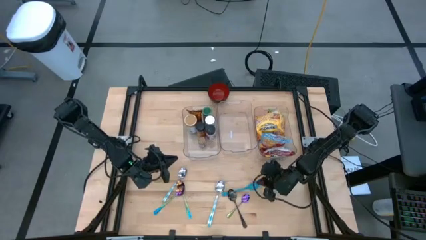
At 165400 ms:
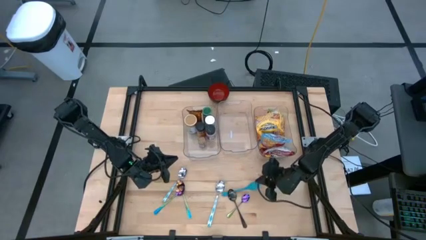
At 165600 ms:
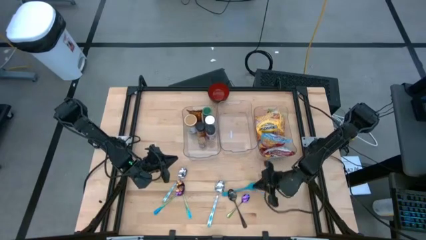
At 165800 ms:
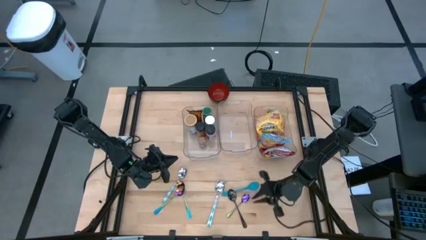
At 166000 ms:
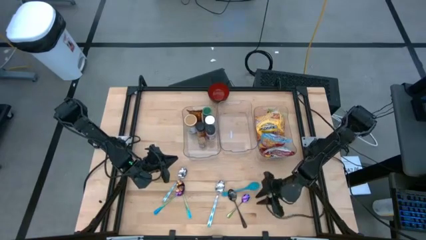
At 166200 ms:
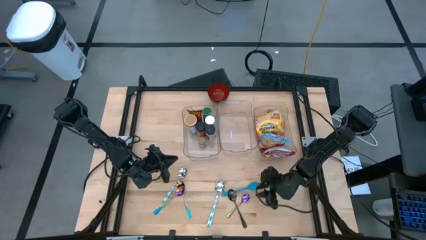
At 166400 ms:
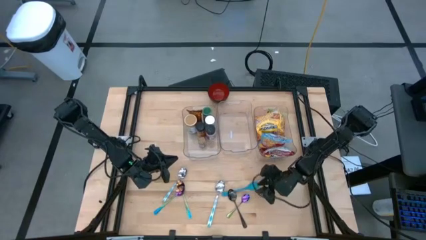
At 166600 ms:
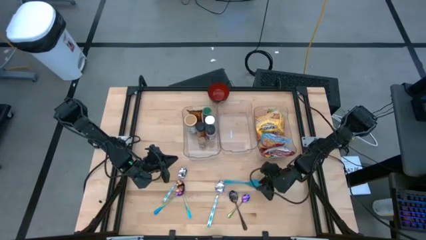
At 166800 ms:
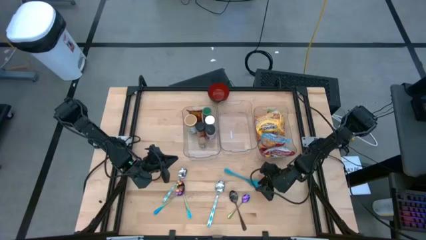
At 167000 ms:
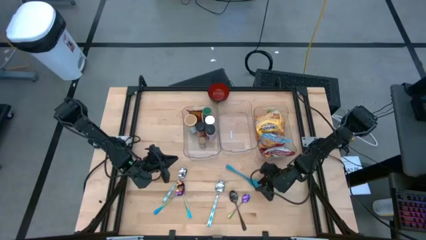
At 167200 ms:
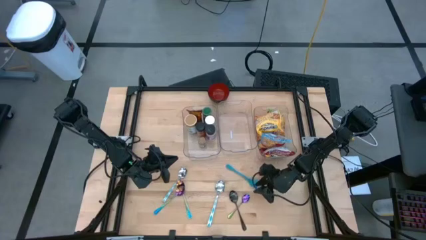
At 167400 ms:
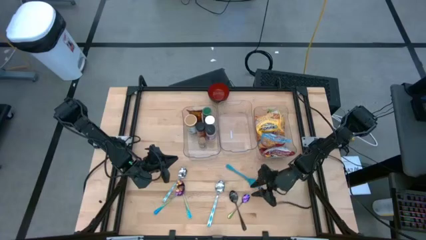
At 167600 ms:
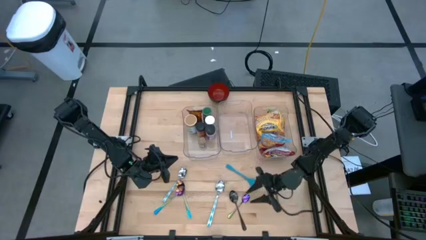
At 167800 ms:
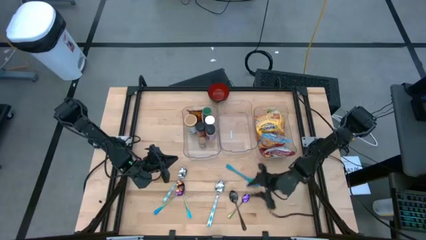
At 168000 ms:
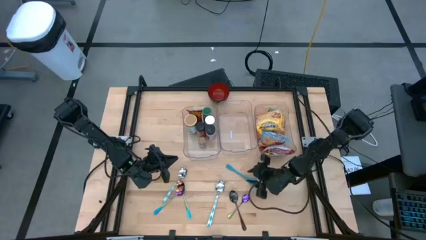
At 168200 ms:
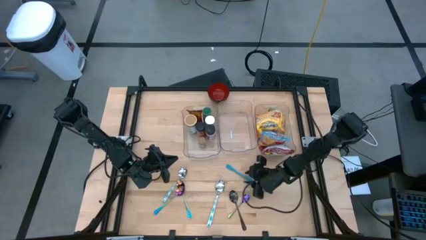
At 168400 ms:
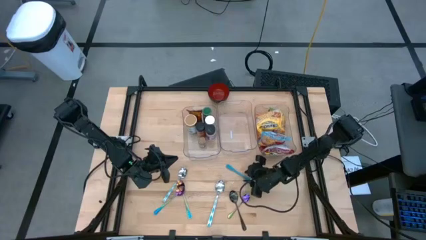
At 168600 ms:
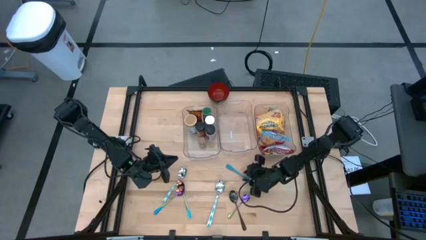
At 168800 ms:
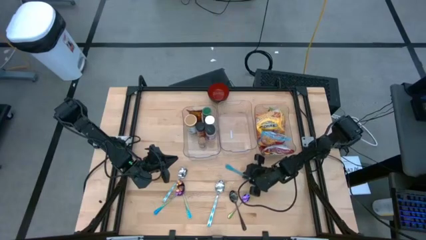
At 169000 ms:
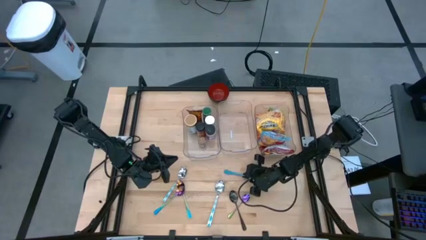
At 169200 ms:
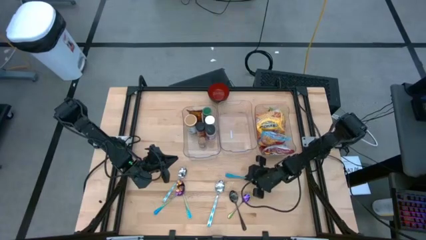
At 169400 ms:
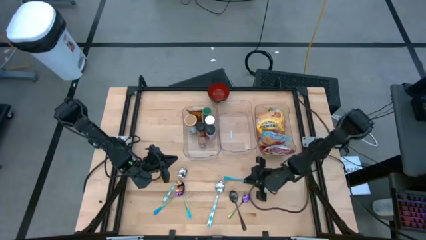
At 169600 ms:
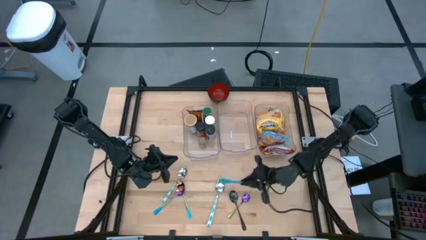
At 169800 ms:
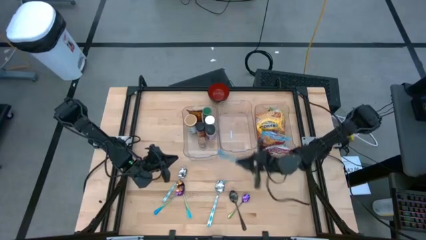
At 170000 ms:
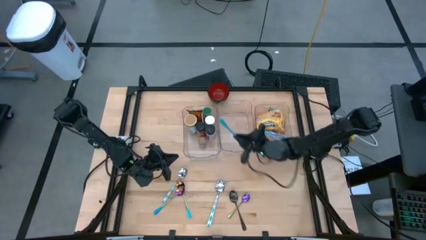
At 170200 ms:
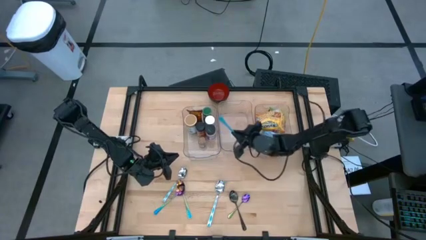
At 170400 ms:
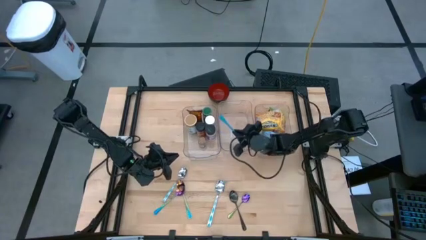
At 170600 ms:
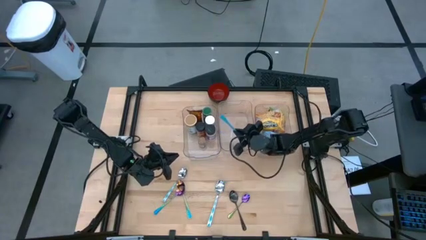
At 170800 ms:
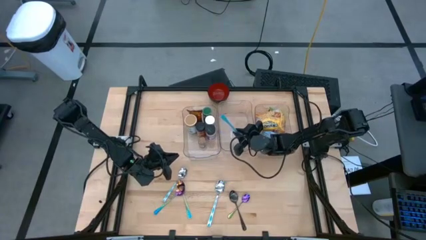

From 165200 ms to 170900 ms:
Task: Pick & Place Food Item
Put the blue spoon into the middle transparent bin

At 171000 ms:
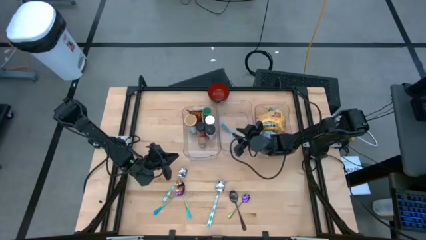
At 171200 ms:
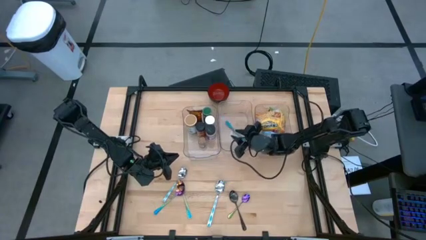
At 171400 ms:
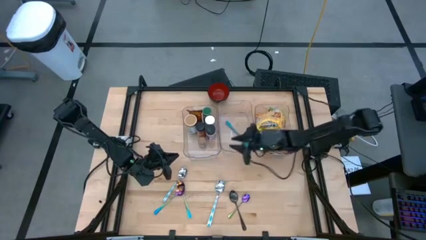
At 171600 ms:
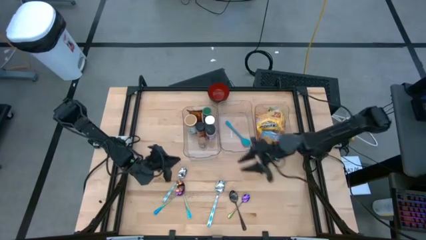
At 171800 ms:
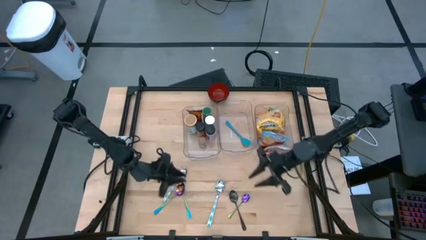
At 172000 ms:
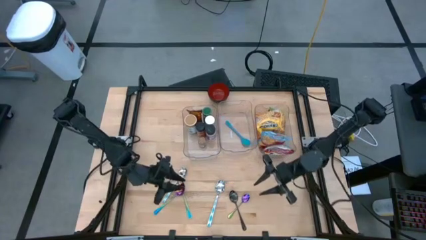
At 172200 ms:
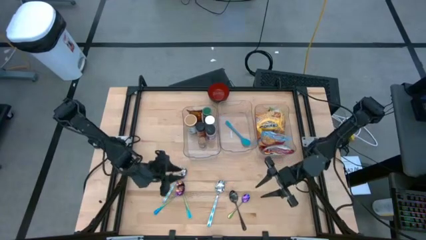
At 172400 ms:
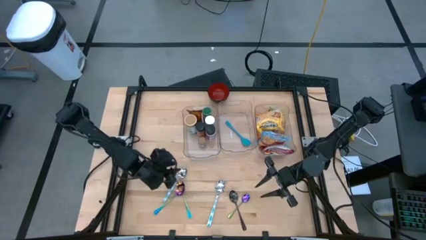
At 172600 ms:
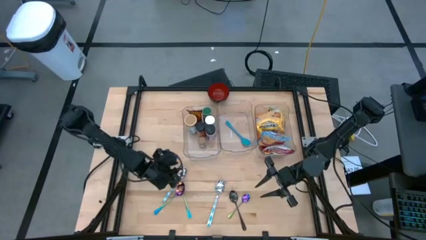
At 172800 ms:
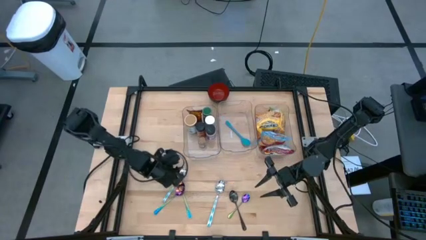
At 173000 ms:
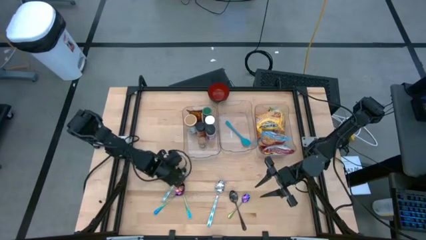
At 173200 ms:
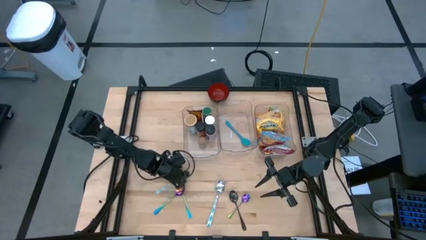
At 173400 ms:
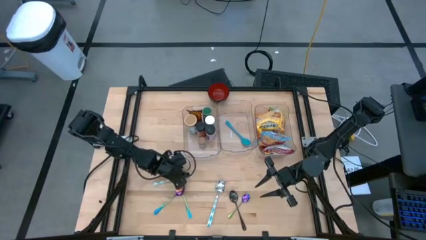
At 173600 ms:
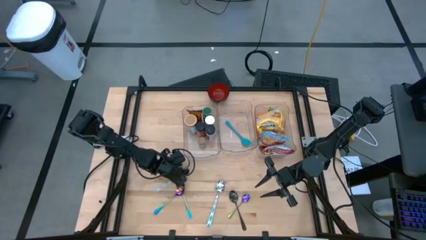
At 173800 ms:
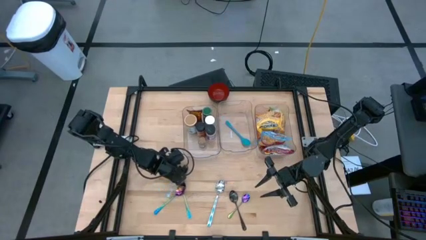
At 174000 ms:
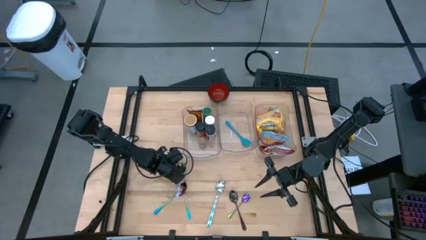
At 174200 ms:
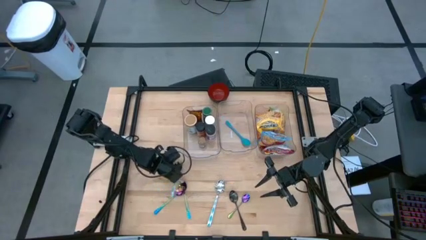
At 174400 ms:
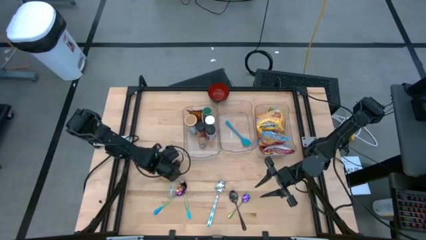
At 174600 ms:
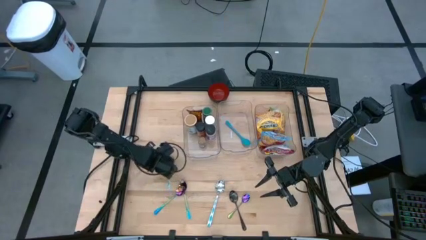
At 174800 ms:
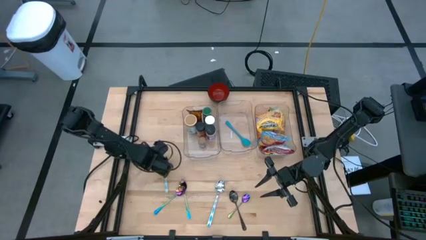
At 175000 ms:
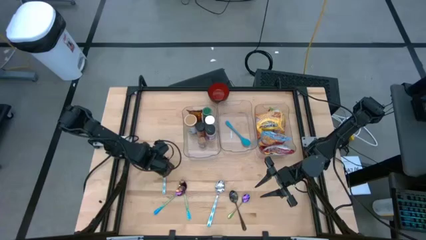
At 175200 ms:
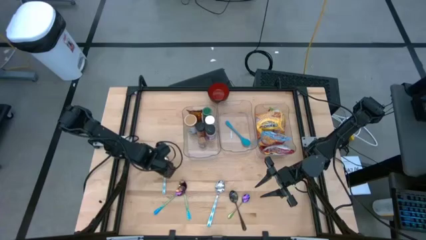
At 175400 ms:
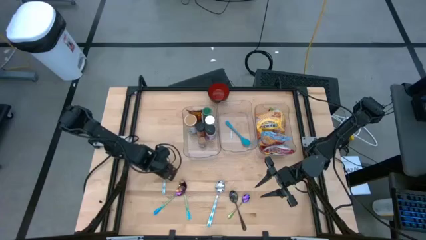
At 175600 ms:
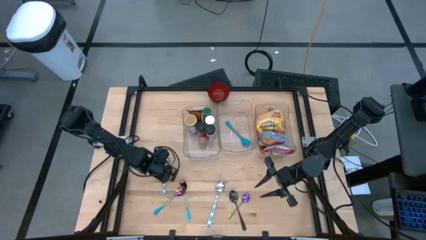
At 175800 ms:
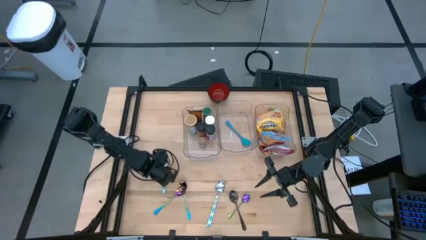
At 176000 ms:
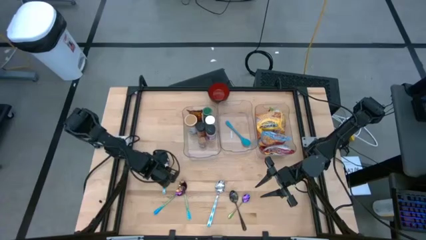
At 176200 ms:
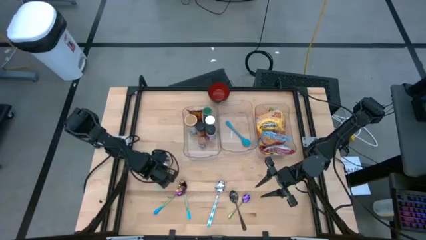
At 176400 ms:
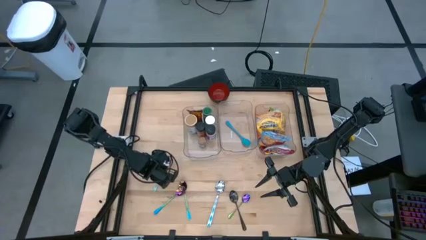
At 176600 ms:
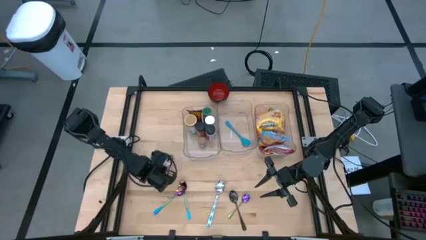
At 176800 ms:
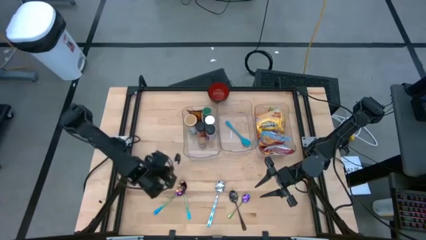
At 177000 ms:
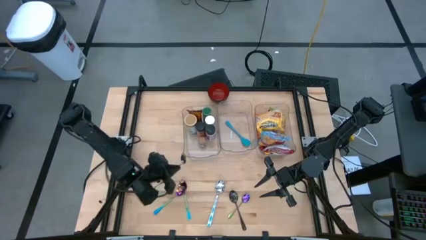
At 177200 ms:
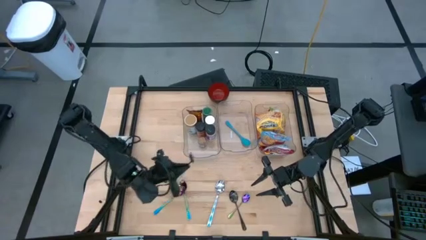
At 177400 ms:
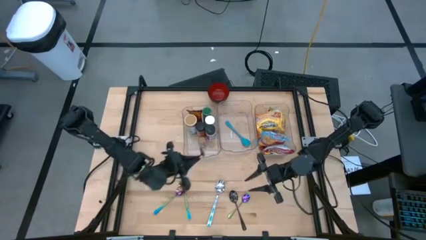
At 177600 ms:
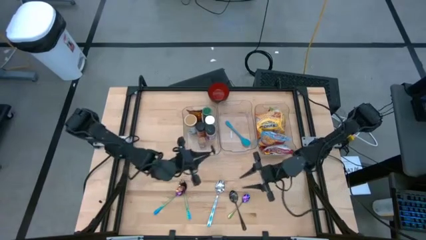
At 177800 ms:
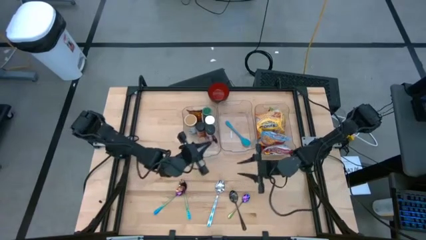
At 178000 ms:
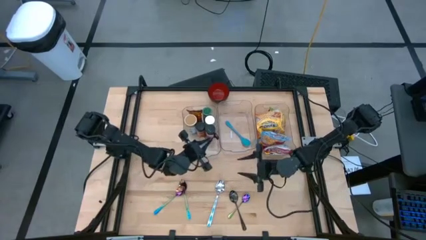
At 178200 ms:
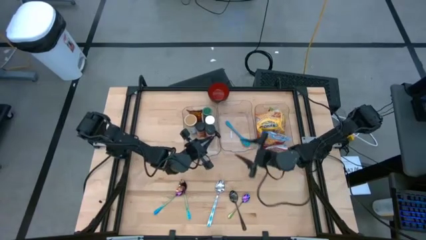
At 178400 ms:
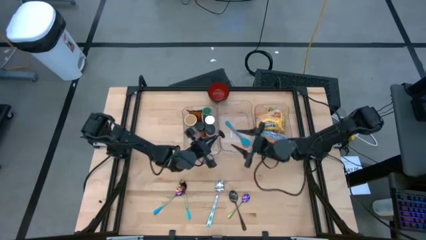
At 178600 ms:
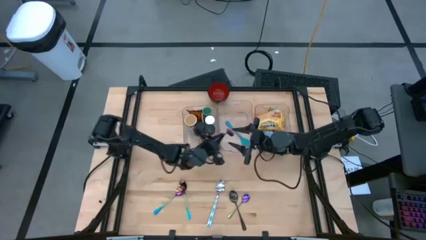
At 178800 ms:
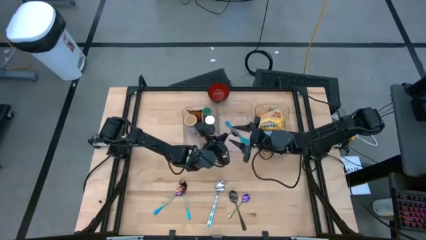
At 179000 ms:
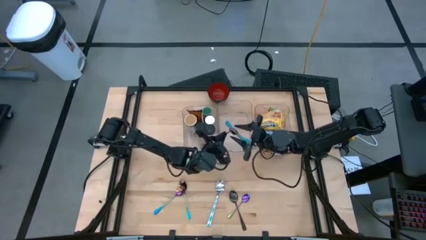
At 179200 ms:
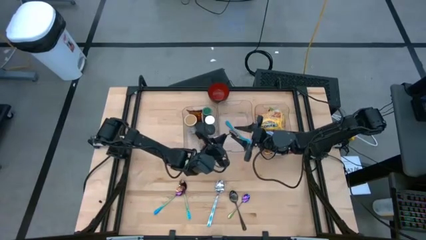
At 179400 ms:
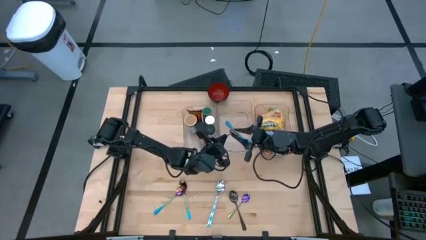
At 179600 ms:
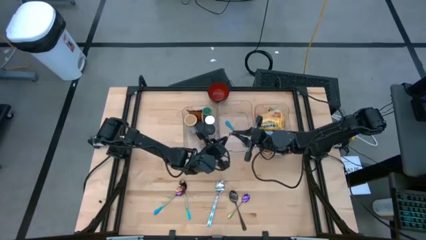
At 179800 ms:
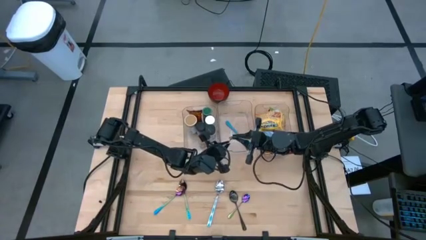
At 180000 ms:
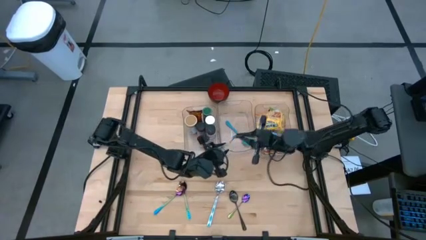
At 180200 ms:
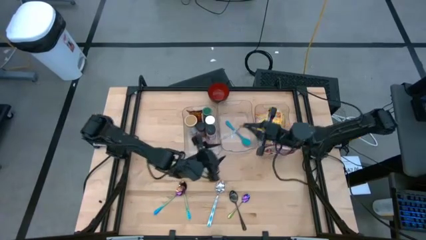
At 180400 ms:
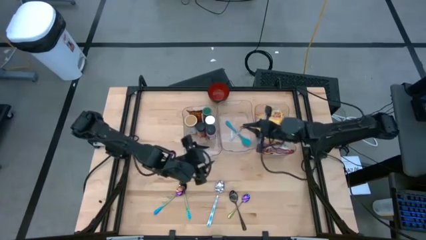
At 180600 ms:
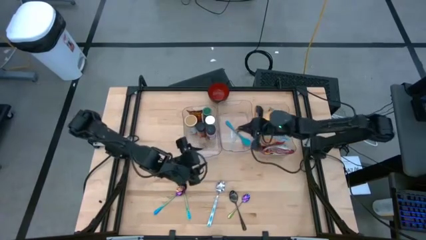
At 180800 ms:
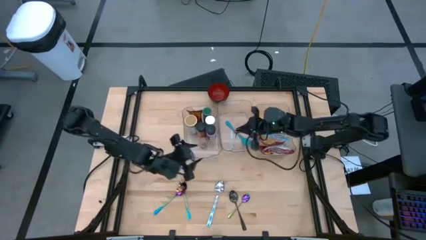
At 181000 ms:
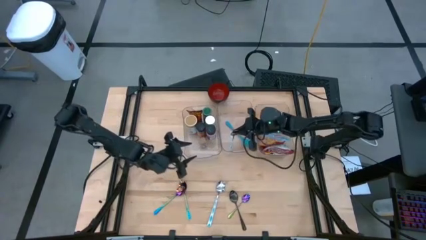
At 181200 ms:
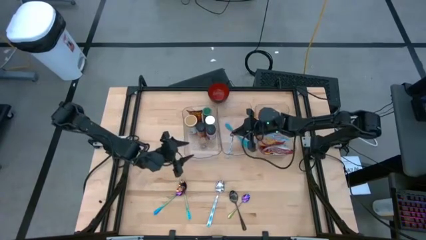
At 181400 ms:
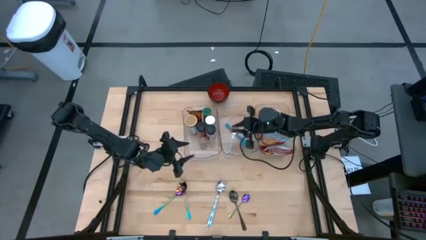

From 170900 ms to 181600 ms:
Put the left blue pattern spoon into the middle transparent bin
